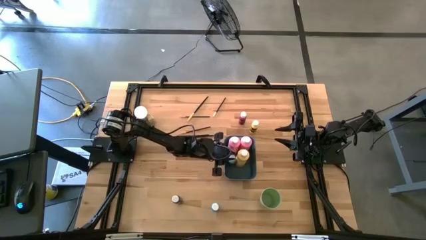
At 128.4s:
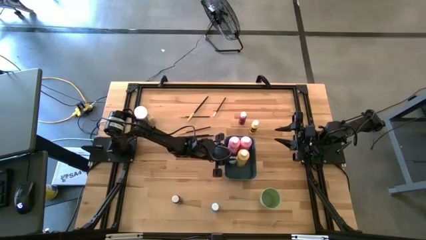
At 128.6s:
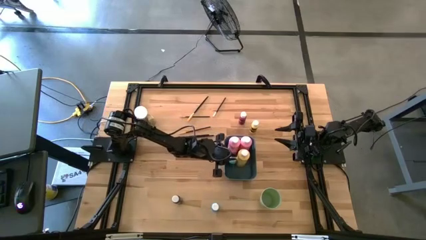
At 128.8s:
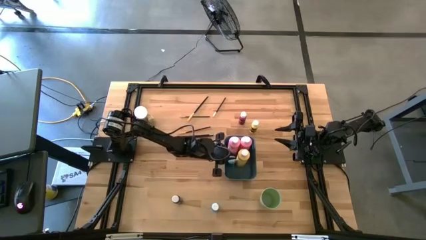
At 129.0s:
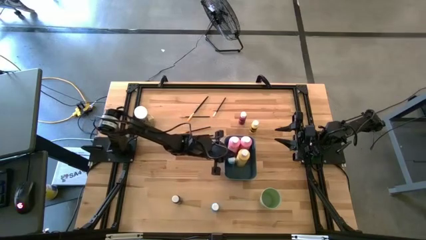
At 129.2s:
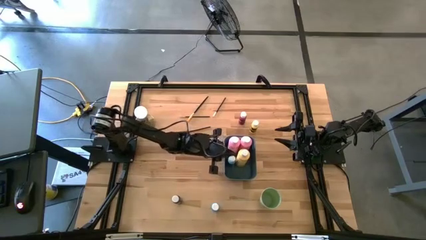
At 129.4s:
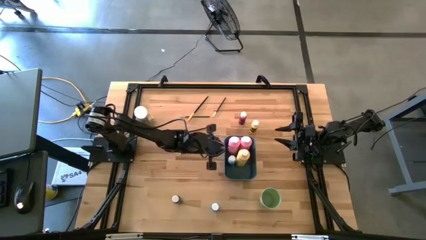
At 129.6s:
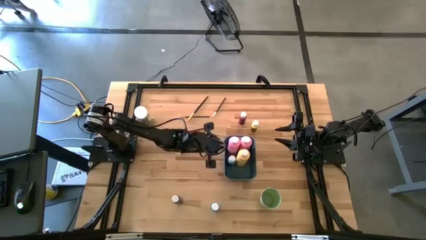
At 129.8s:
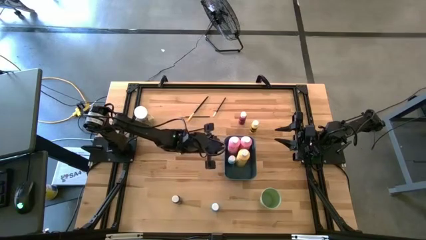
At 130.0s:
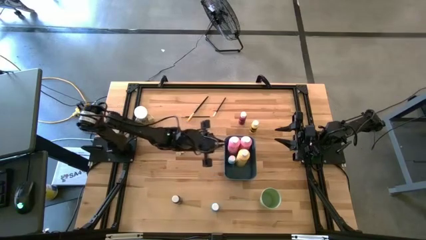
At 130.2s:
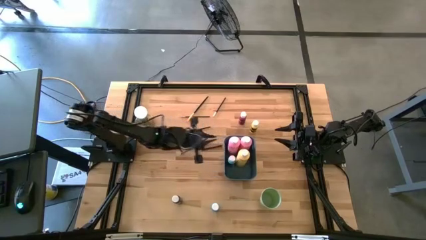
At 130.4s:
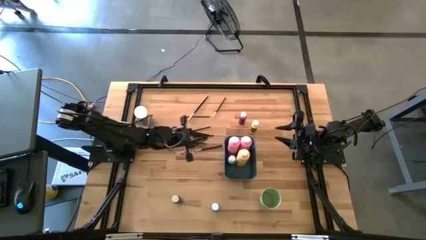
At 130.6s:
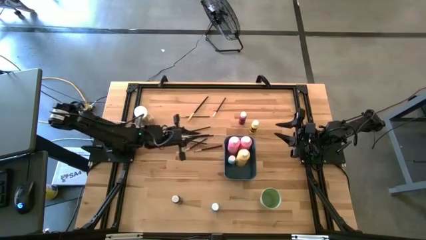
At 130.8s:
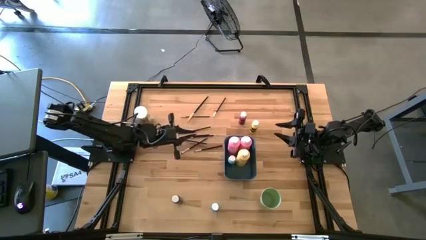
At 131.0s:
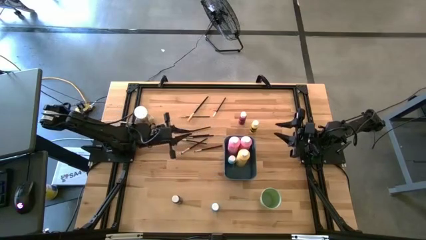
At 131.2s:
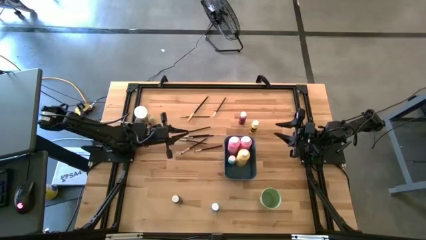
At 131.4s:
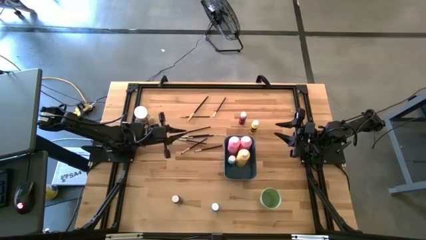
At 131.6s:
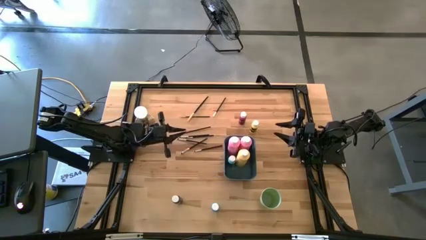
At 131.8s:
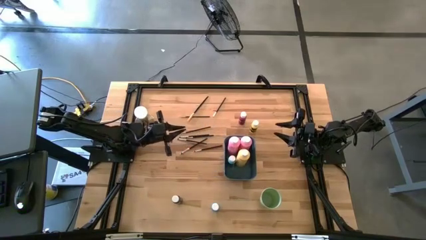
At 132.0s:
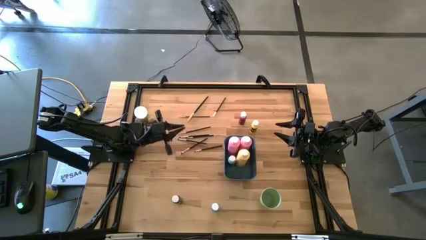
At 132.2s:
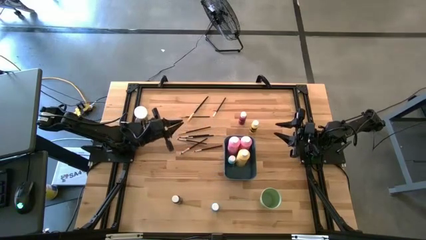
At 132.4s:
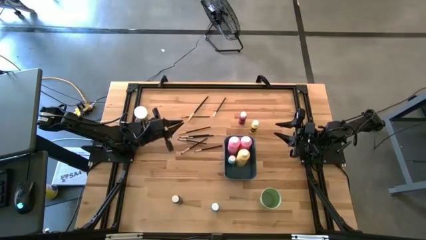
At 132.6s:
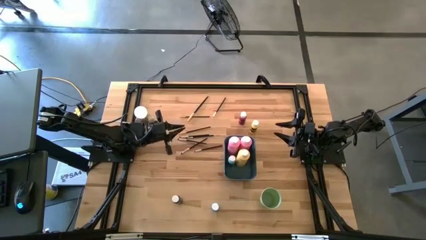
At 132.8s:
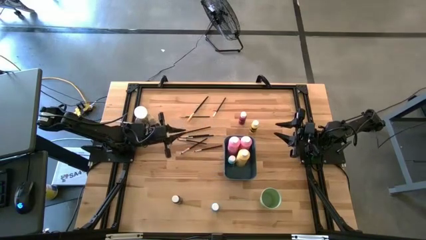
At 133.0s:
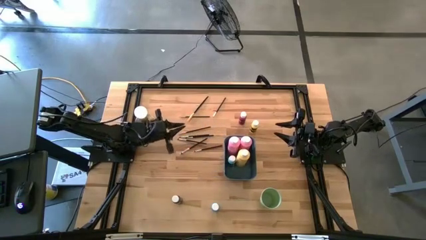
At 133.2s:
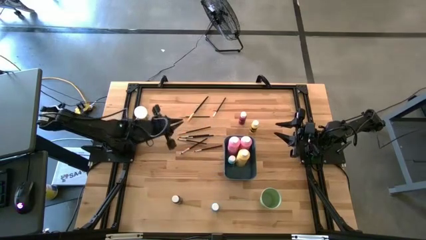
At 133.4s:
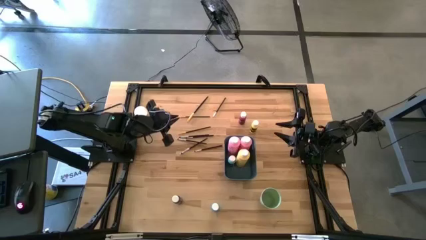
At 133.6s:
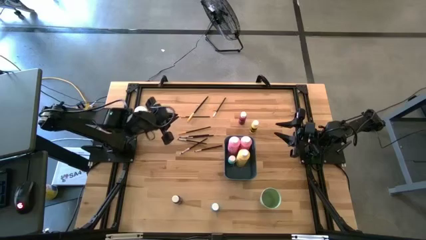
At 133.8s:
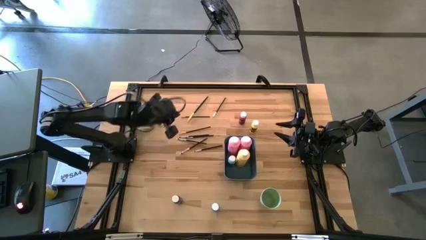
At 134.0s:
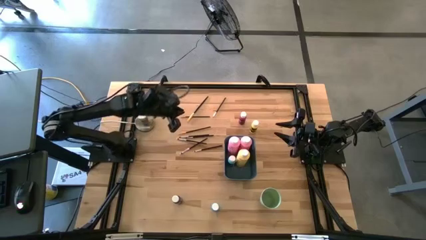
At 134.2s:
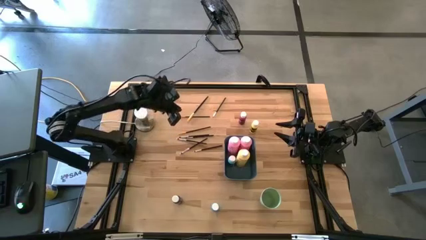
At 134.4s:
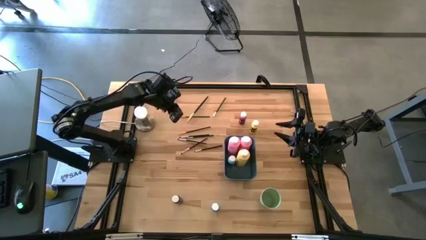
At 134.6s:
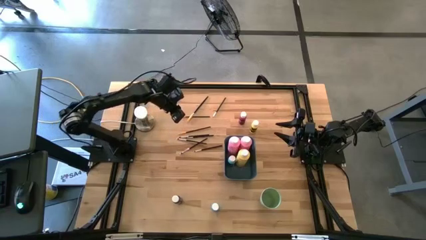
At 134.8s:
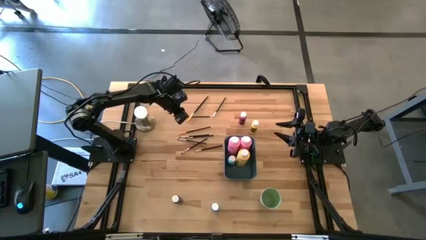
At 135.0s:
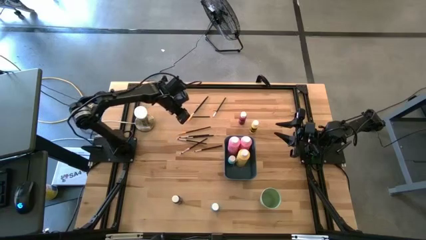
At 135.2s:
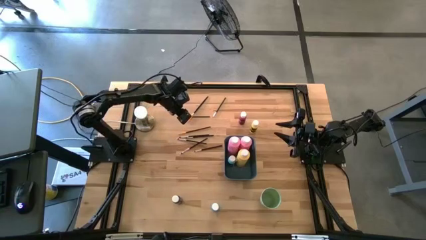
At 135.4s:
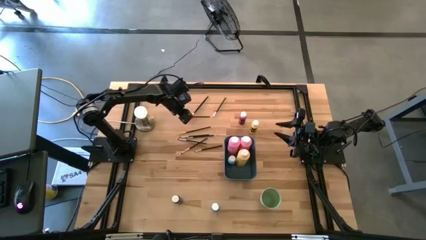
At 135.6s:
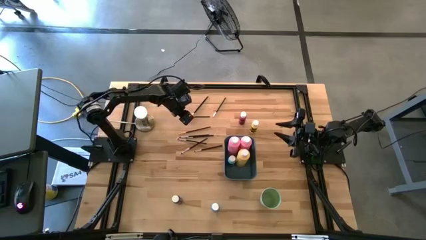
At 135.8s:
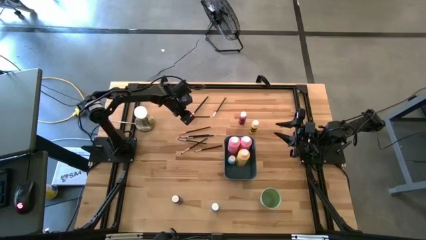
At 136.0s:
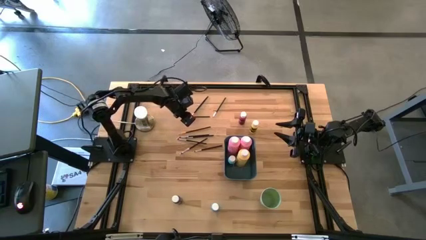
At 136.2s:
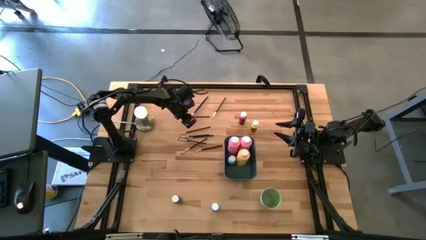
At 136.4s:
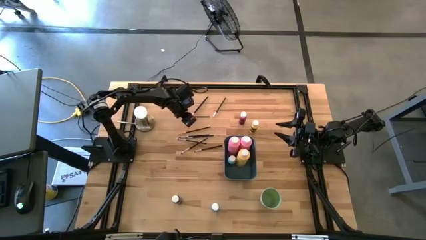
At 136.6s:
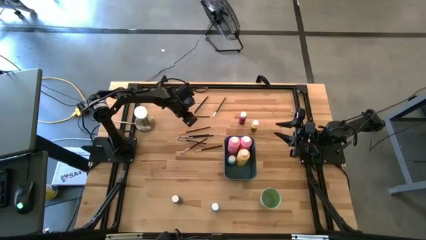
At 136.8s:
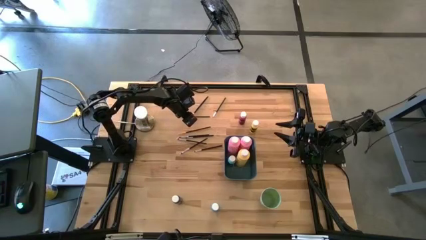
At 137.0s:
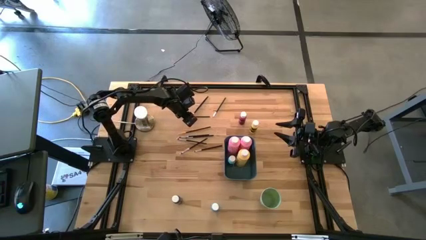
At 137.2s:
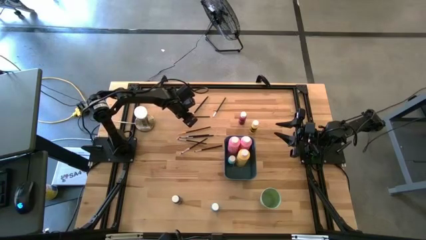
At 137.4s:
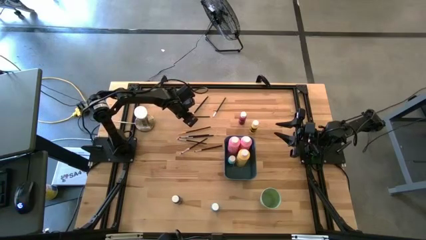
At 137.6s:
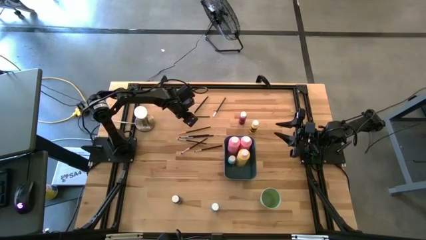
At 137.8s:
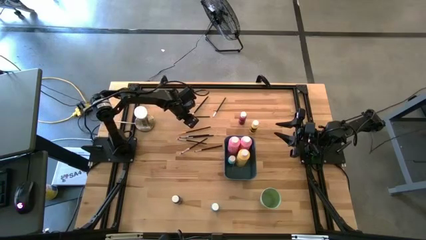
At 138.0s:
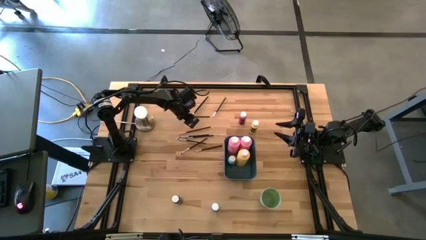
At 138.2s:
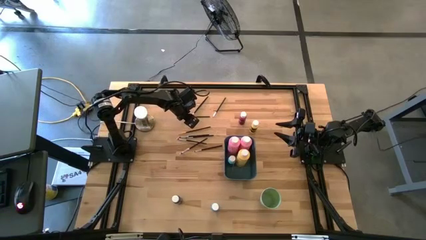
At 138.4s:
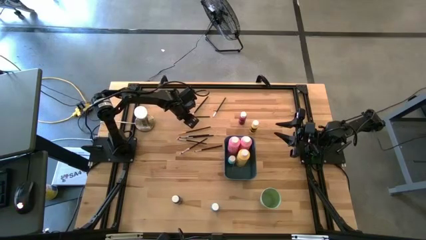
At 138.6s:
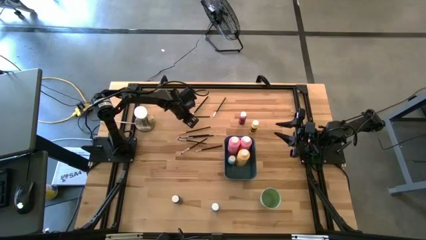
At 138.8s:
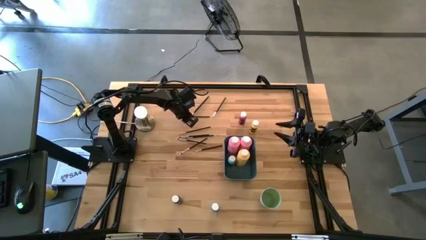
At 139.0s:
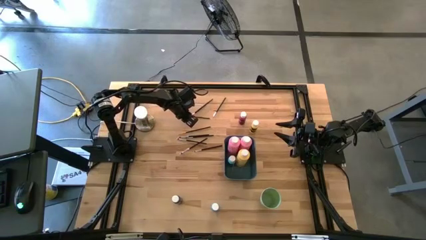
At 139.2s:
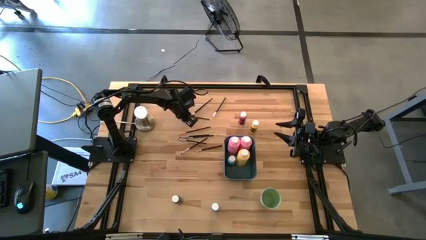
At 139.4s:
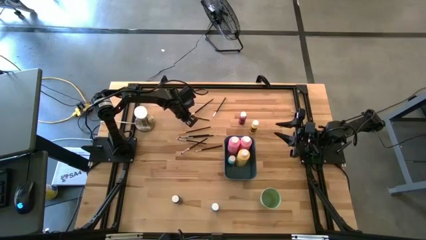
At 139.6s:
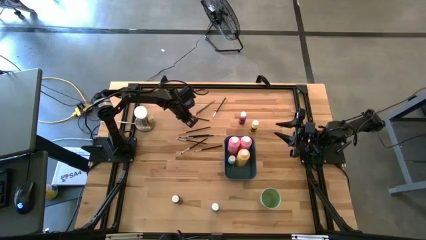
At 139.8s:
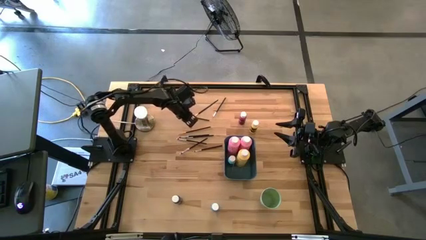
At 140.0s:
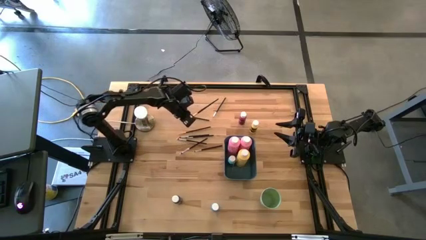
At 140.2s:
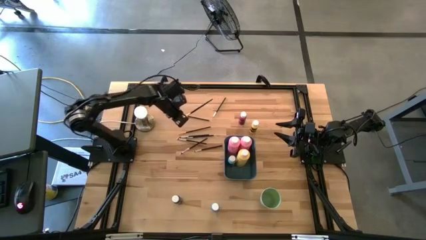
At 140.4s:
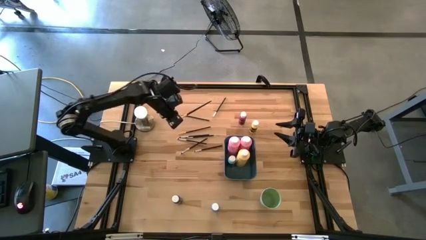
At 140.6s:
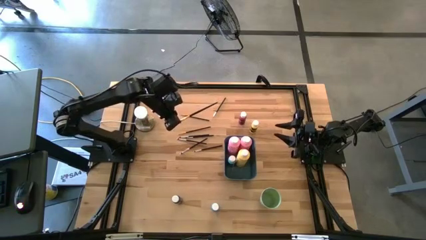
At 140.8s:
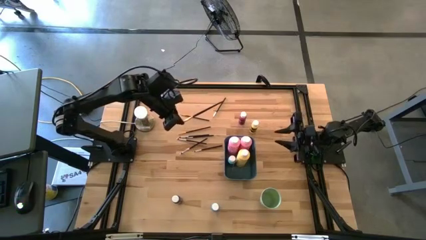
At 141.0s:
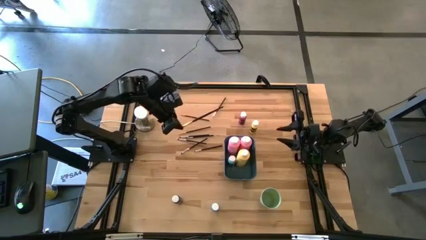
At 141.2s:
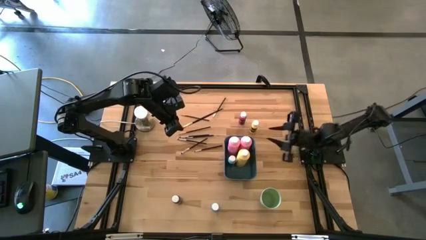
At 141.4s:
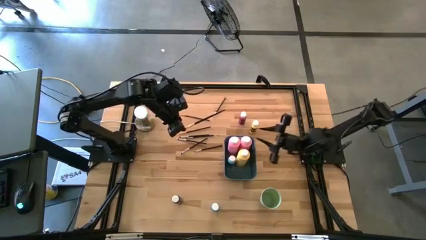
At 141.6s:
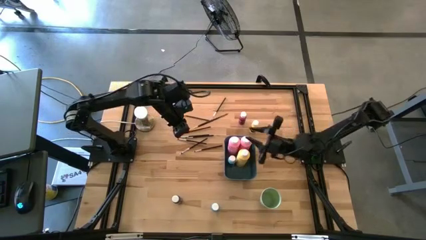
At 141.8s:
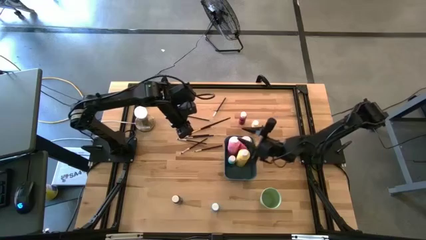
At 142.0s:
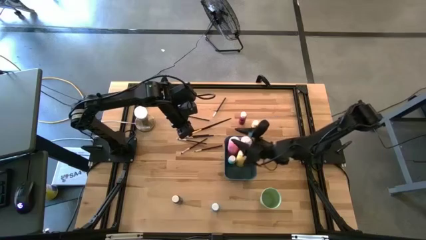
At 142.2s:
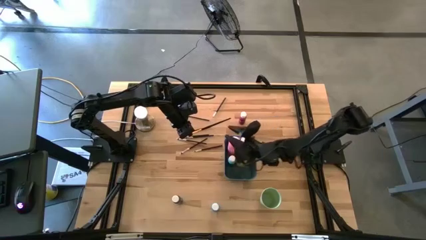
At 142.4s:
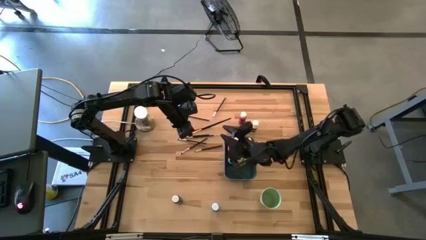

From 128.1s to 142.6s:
Task: Pick & Place Paint Supplies
Put the black and gold paint brush into the green cup

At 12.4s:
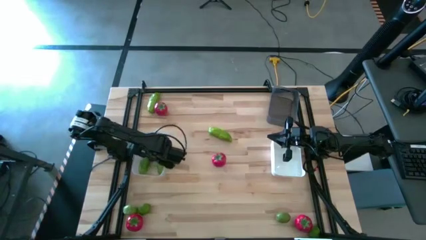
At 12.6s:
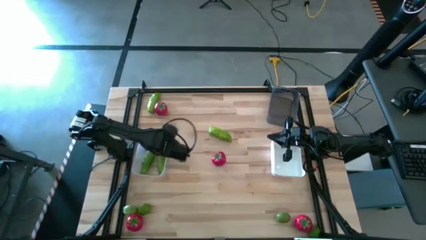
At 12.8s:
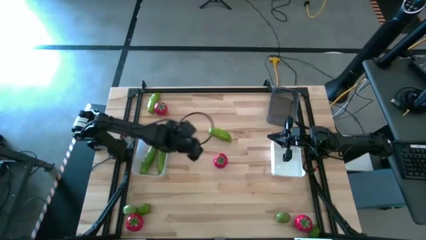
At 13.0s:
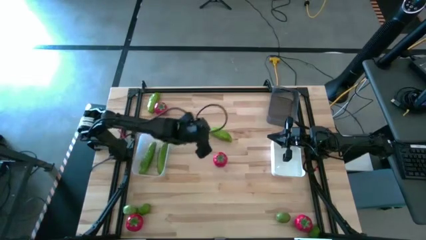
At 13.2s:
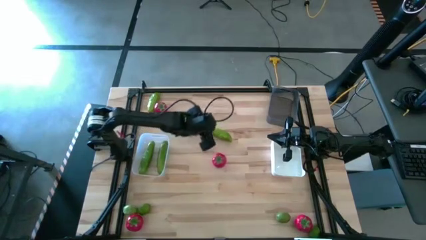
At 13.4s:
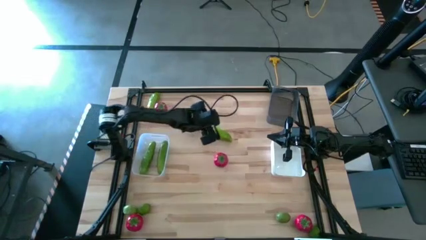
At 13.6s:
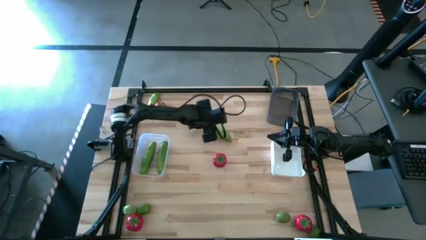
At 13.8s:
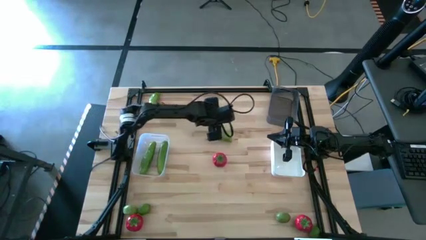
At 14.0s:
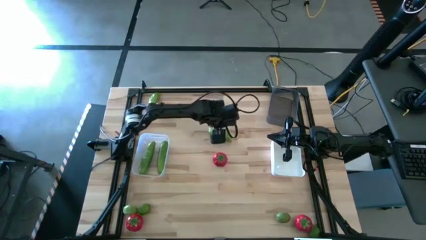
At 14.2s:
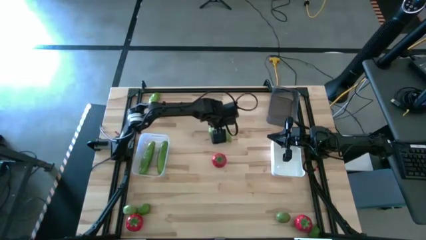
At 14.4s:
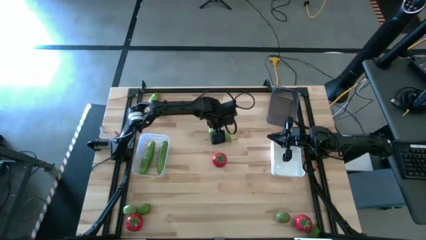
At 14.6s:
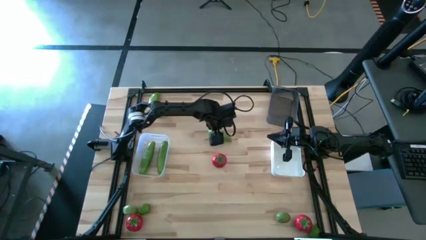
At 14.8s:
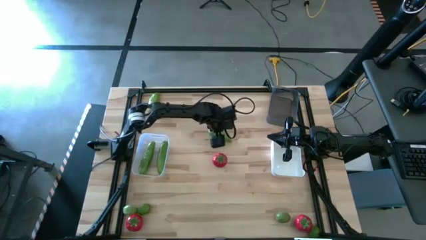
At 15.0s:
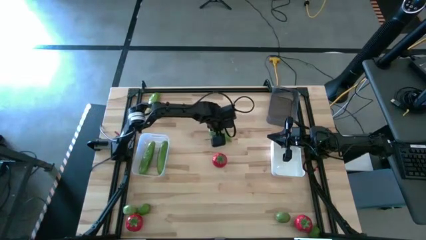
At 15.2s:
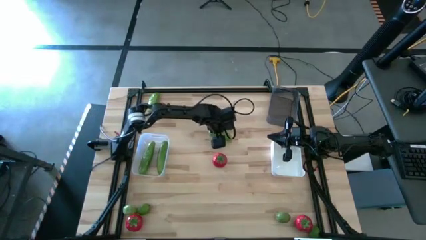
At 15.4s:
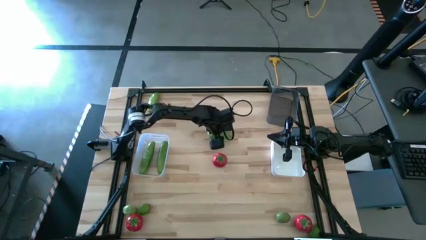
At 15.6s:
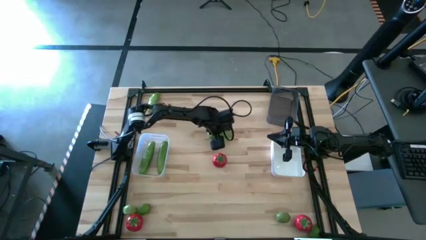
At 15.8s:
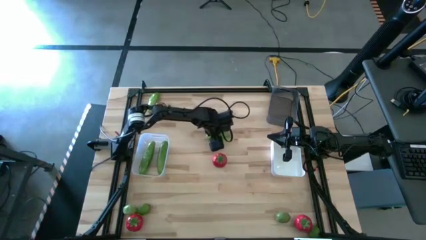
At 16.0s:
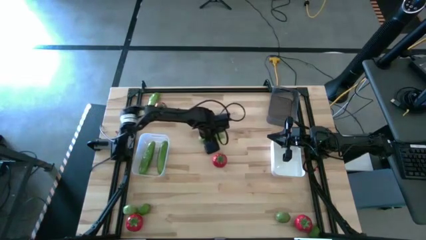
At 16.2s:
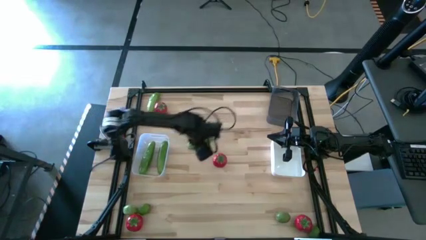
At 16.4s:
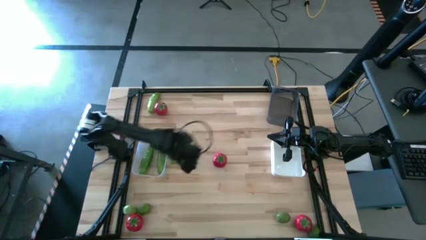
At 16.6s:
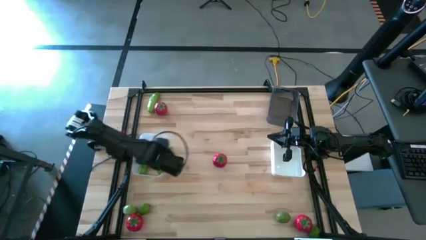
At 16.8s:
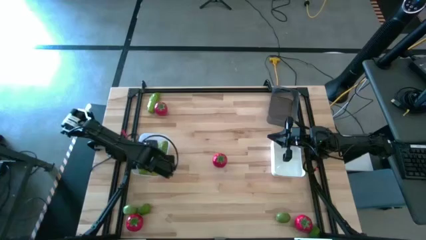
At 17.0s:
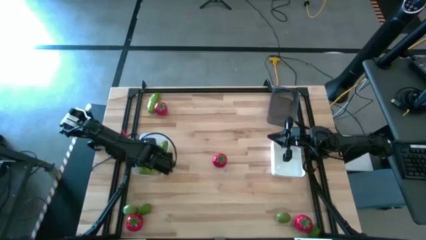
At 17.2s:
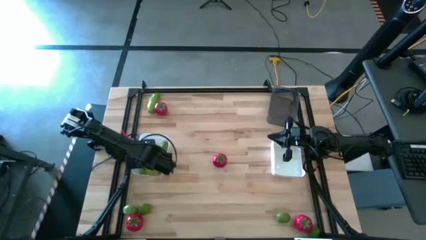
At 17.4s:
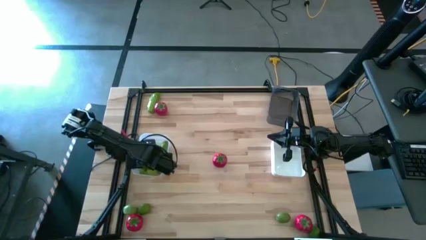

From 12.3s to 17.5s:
Task: Sort produce into baskets
Put the cucumber into the transparent bin
